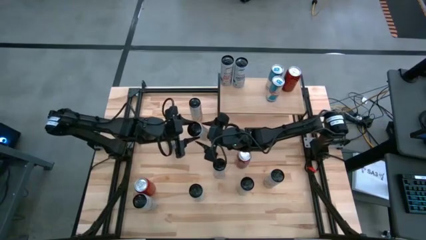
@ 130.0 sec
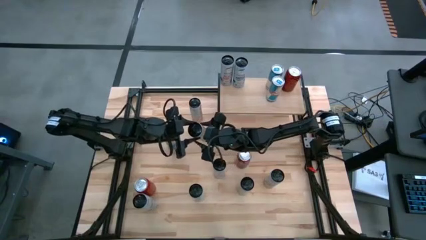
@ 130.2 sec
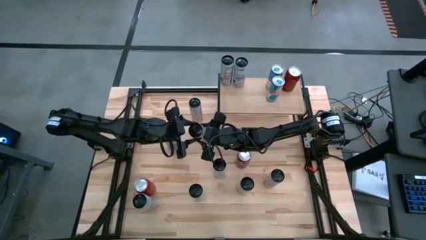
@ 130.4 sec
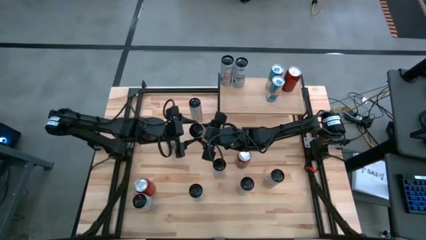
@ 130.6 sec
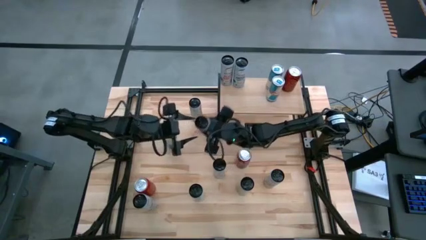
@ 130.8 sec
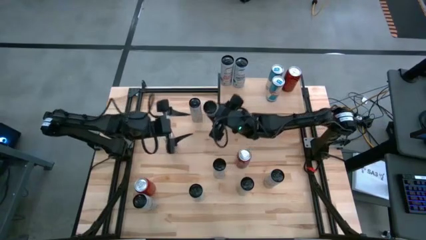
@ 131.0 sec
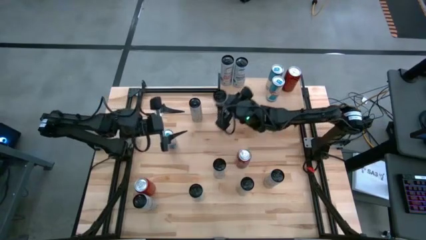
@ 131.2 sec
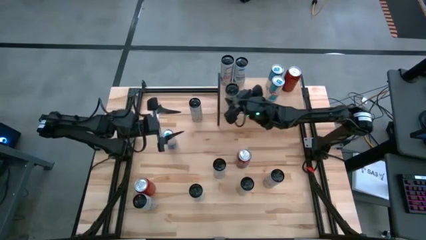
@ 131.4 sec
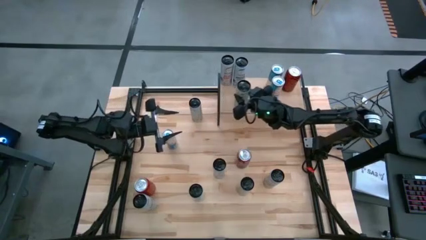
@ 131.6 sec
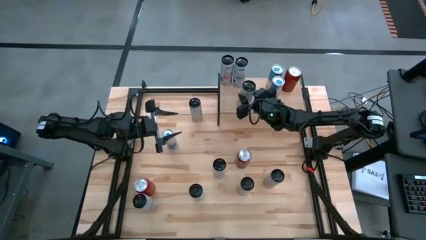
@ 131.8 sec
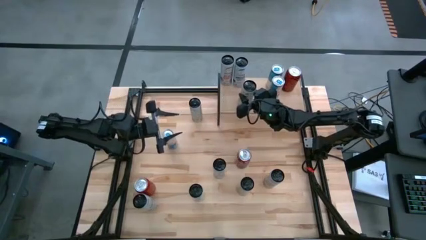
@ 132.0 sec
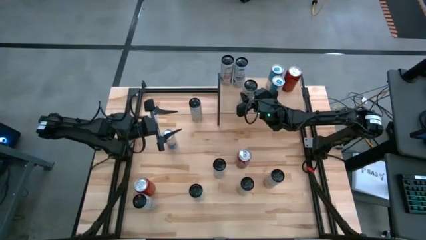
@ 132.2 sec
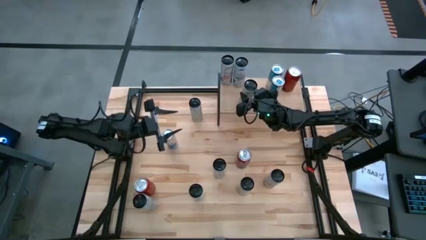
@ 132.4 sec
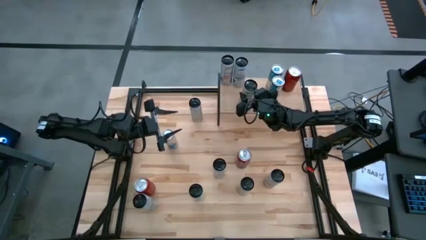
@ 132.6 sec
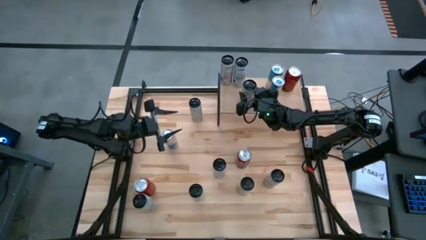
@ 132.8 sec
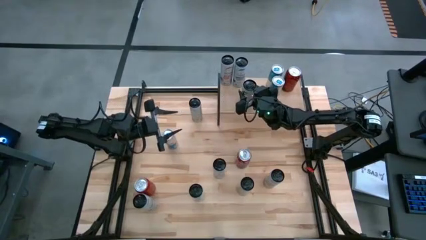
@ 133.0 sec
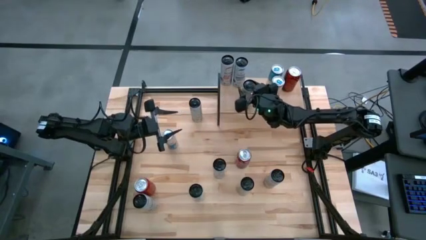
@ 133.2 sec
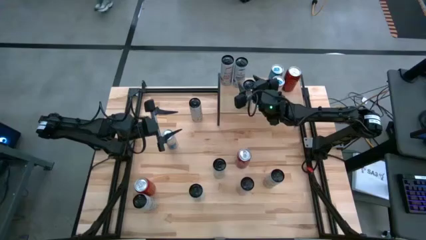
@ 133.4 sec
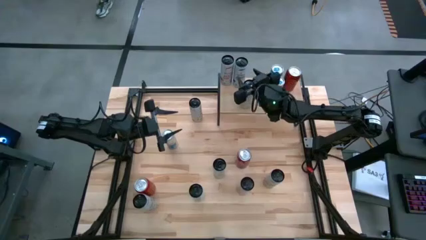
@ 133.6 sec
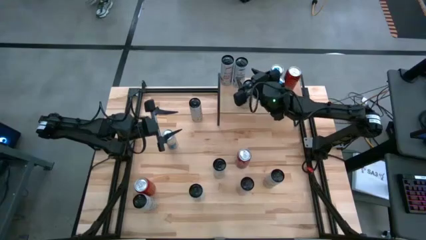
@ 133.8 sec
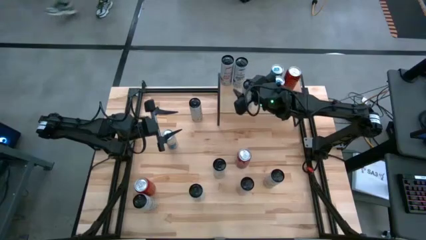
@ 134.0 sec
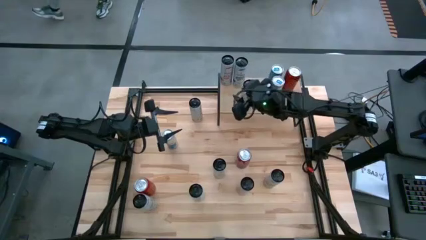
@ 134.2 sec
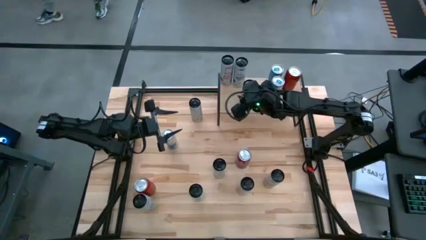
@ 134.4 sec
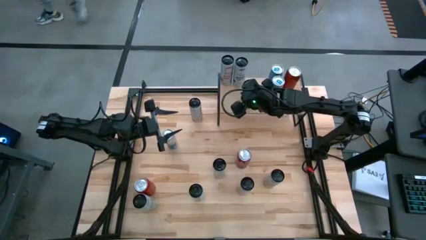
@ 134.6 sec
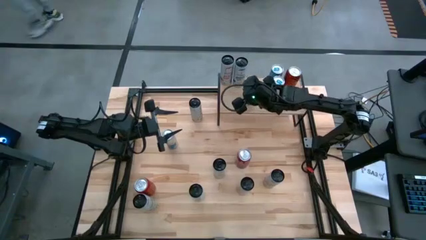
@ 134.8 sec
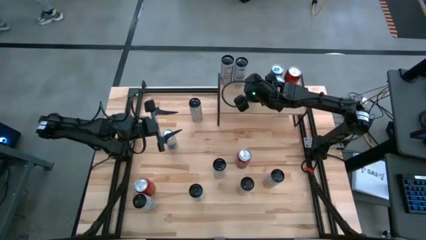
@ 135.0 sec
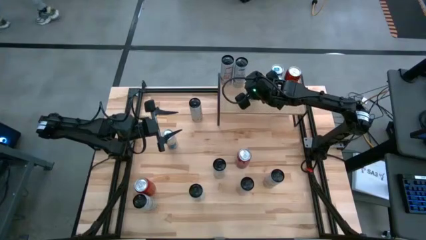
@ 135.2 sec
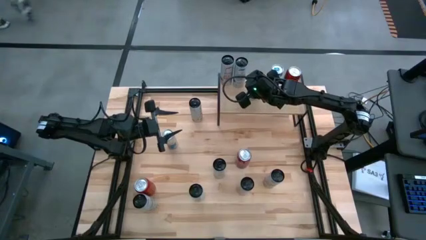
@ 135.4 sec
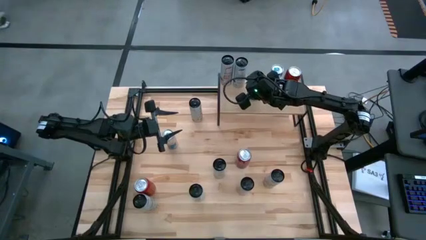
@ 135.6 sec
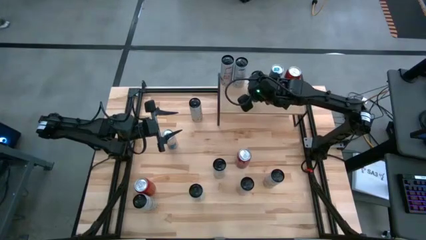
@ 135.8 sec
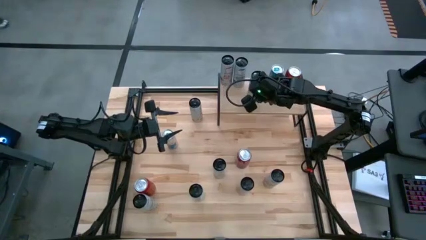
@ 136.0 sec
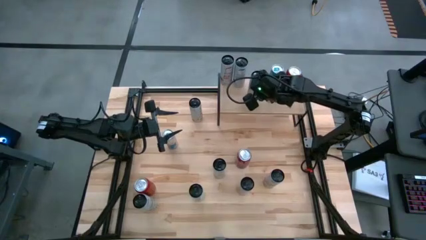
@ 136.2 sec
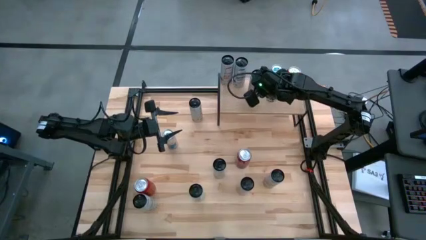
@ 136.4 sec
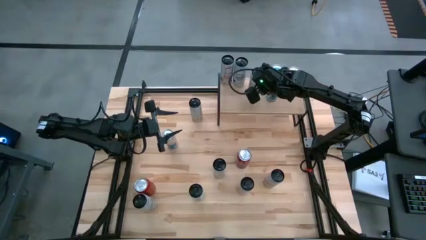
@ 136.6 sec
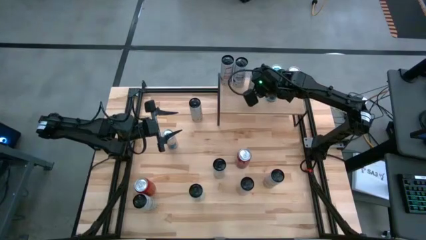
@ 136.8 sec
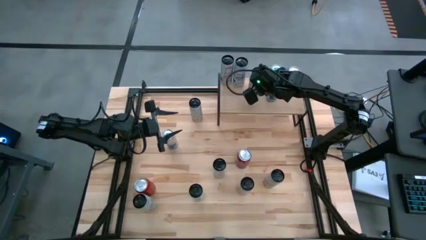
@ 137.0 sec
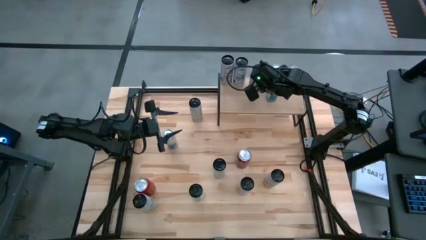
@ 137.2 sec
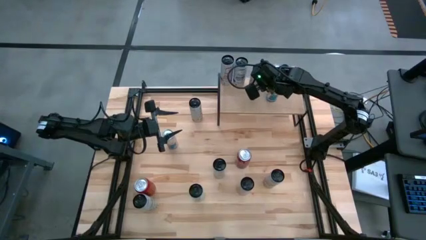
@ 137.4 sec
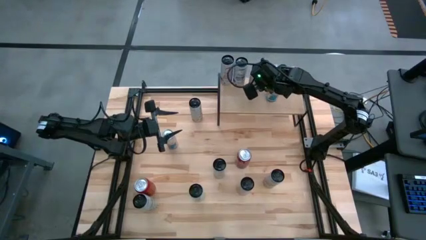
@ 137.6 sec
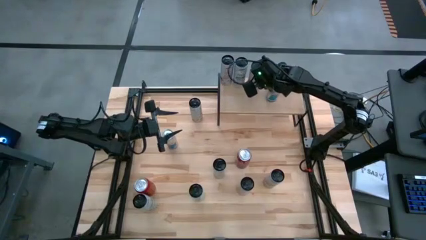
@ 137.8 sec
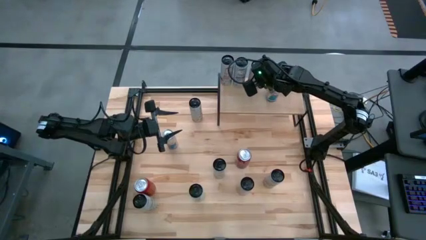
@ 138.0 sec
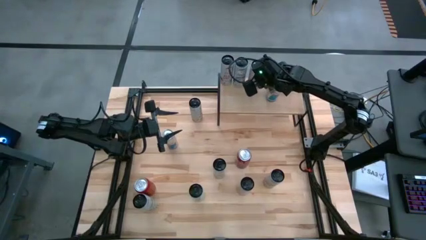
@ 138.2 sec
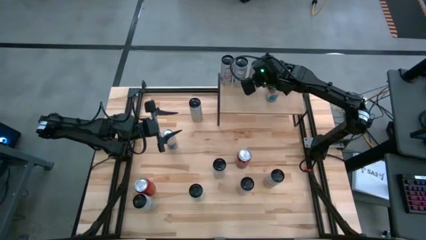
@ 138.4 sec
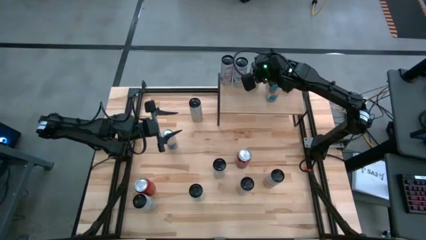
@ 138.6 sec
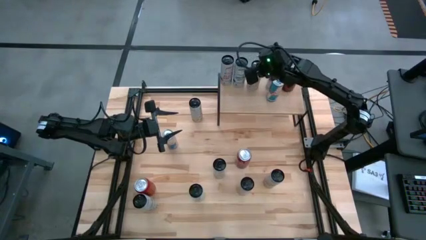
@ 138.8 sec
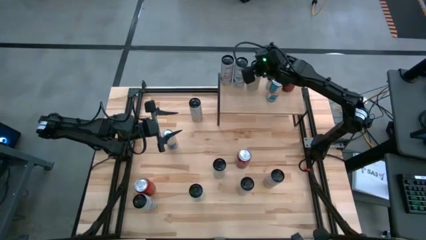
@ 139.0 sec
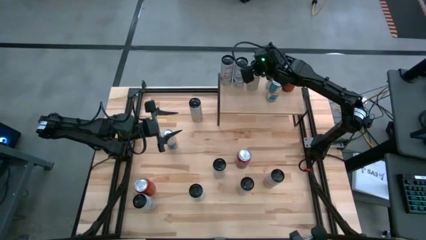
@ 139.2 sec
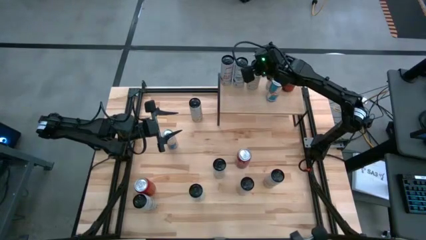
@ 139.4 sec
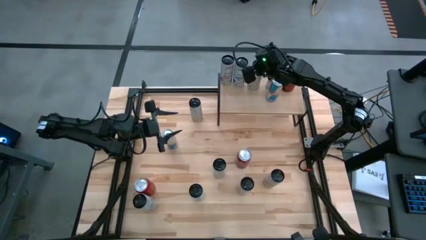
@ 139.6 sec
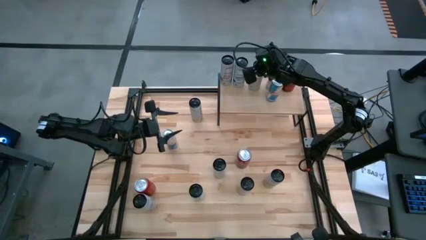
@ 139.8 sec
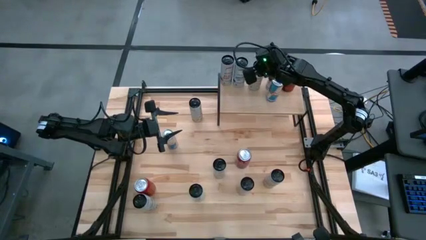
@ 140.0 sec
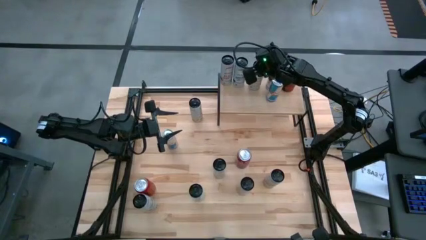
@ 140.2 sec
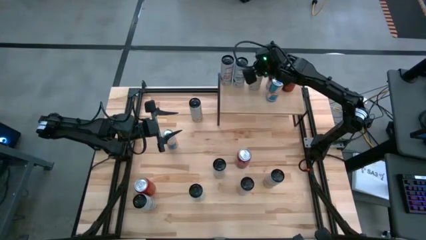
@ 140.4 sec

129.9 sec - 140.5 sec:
Task: Place canned beverage on shelf
Put the middle white yellow soda can on the shelf

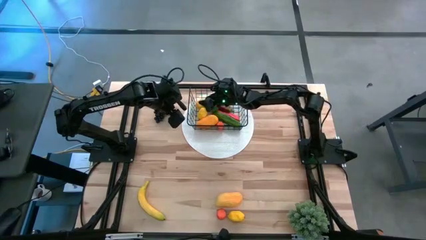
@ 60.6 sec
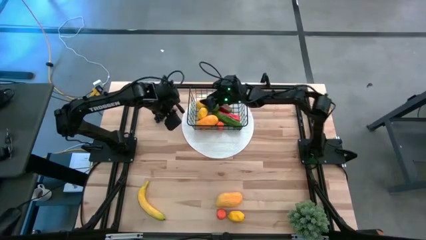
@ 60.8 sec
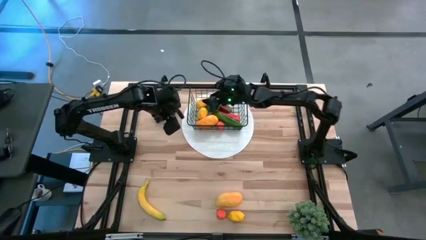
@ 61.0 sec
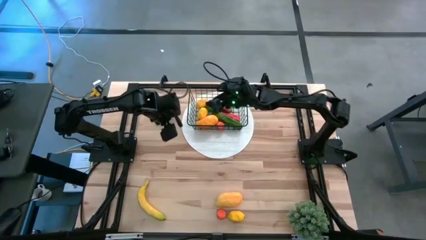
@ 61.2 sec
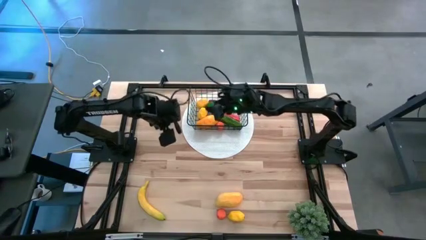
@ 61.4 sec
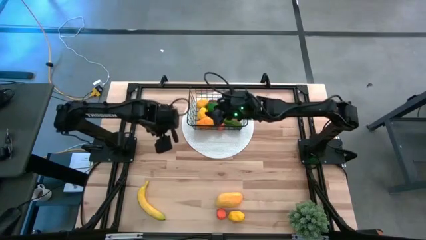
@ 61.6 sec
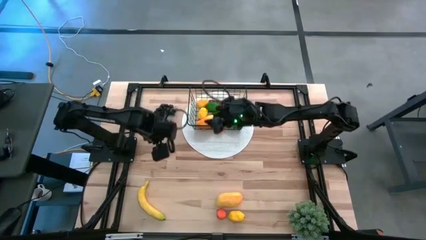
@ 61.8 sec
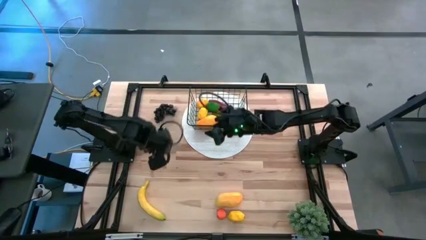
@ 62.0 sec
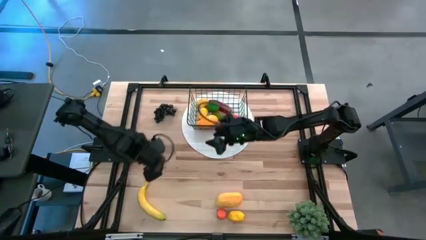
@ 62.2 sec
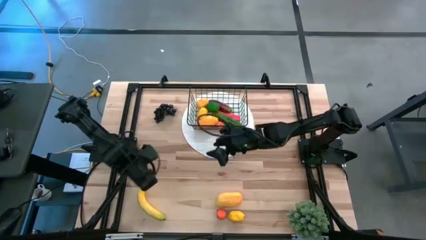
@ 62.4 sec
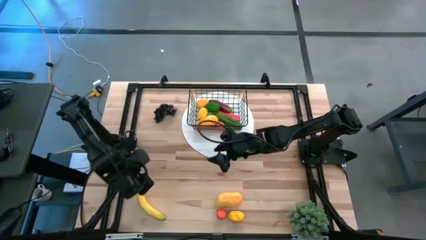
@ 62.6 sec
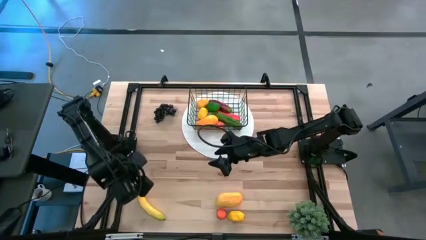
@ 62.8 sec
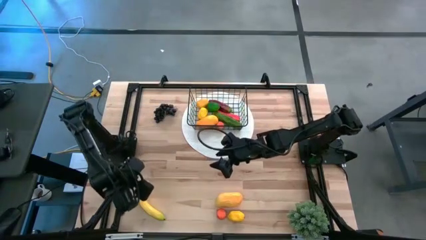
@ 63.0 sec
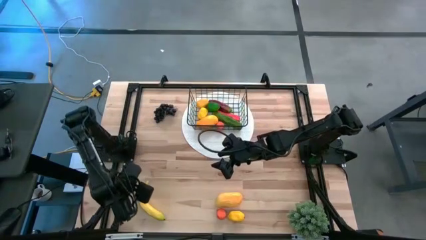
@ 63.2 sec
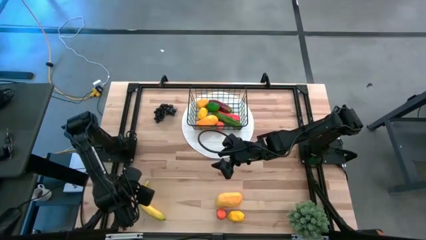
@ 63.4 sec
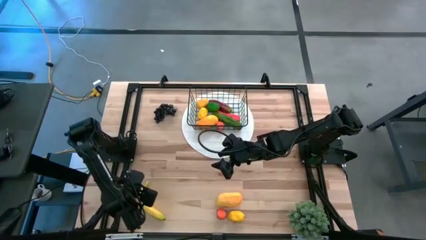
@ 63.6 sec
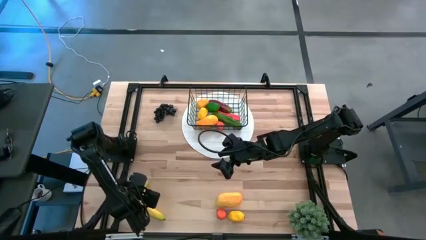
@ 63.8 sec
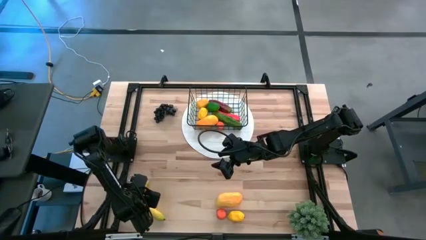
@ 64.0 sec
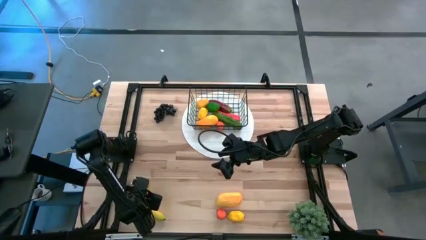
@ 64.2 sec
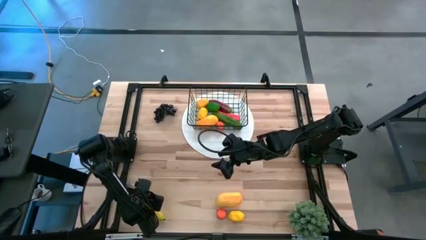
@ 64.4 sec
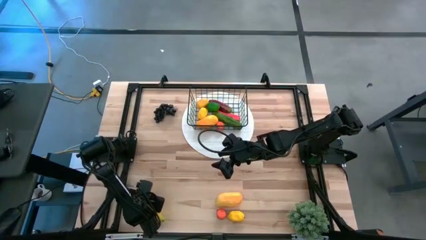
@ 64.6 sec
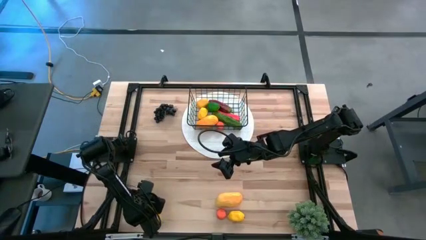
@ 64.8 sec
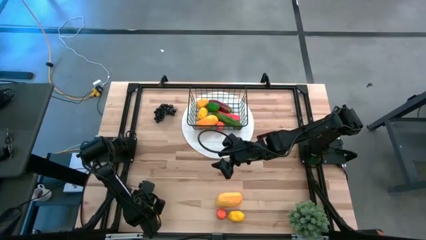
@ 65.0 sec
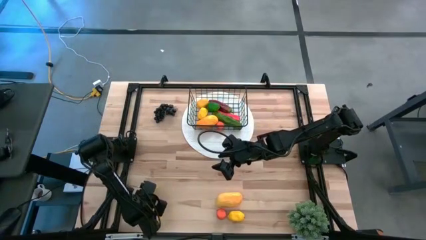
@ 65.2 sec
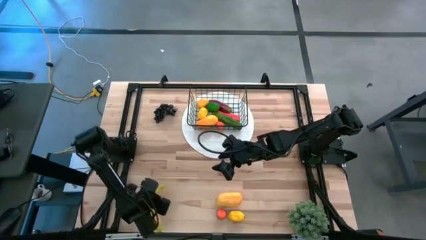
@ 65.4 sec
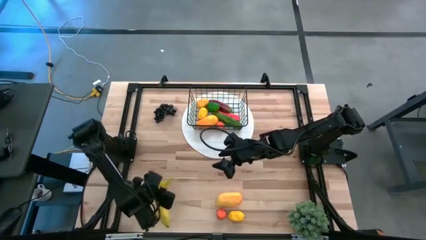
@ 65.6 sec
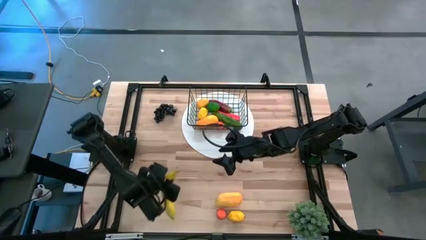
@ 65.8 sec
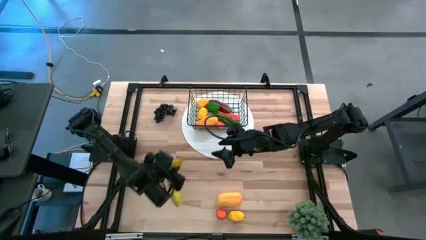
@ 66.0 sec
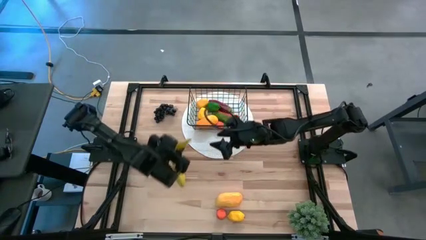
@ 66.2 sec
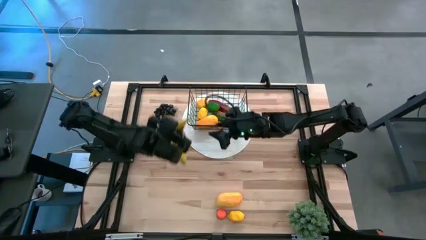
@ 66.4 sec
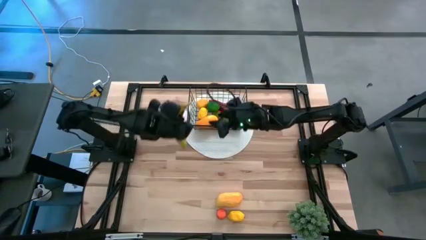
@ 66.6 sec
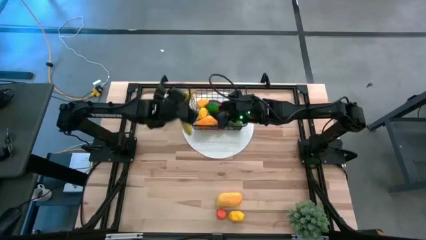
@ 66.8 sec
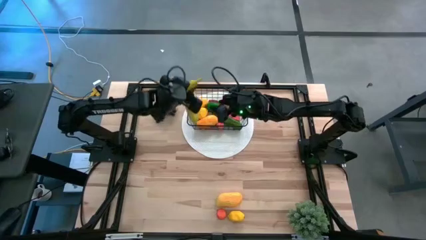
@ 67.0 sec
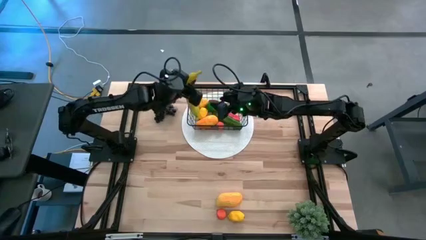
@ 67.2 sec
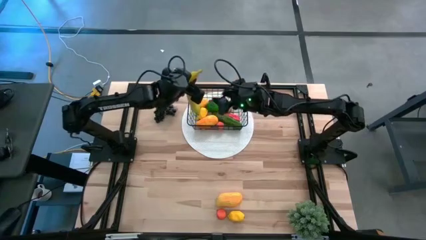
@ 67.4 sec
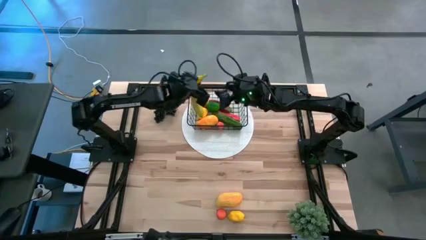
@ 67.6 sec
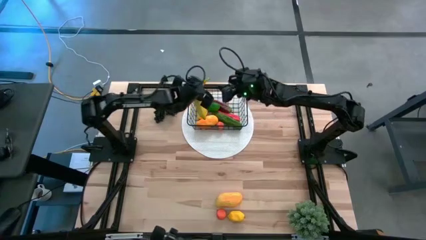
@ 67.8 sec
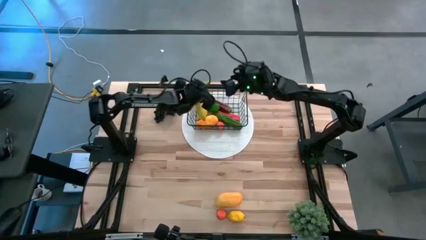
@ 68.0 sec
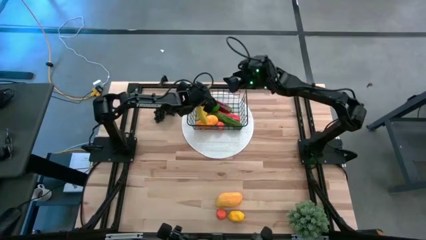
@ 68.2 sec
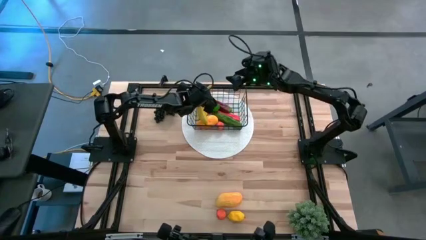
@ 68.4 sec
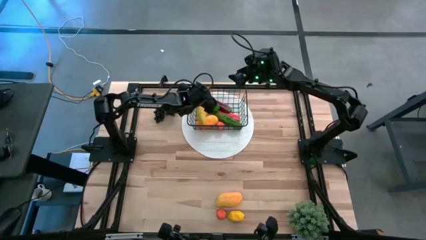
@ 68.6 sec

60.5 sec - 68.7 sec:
Task: Build produce basket
Put the yellow banana into the black wire basket
